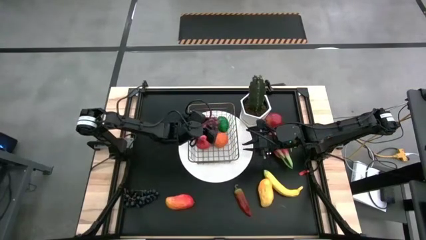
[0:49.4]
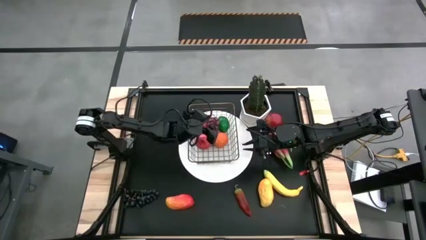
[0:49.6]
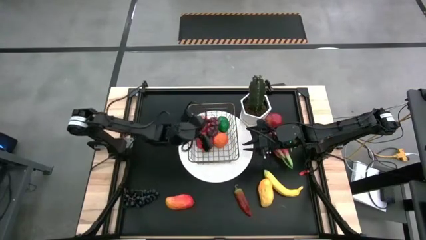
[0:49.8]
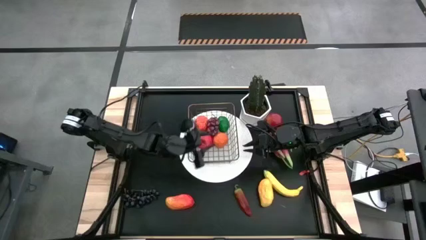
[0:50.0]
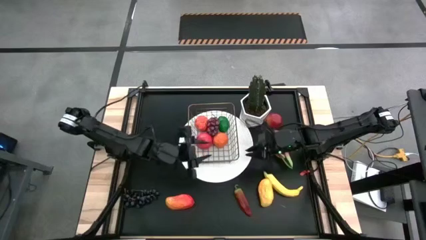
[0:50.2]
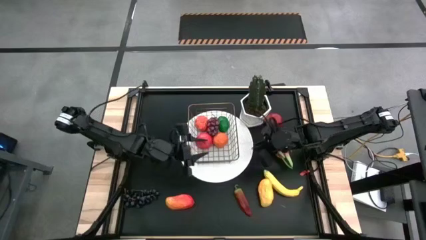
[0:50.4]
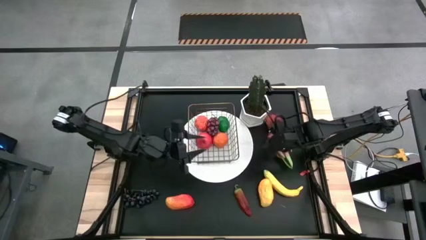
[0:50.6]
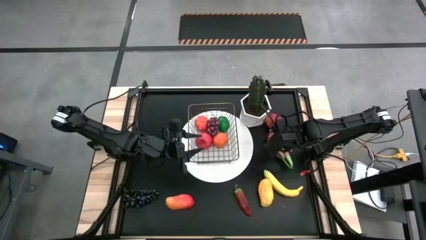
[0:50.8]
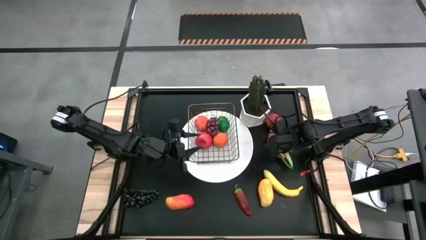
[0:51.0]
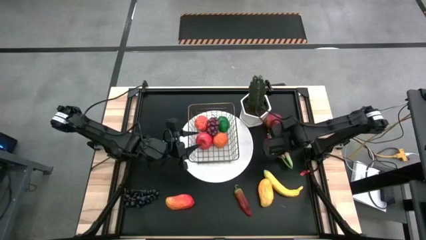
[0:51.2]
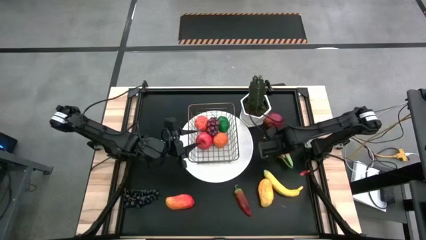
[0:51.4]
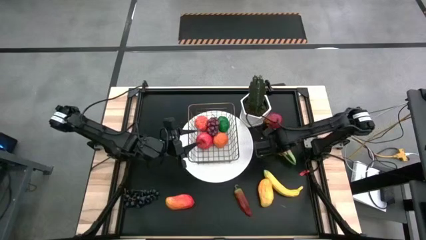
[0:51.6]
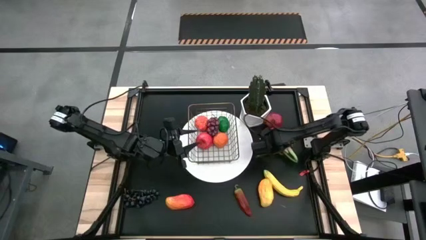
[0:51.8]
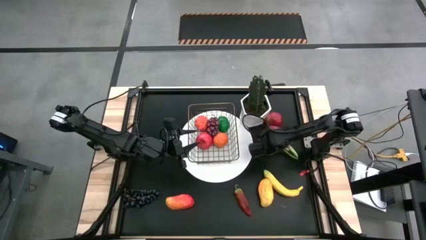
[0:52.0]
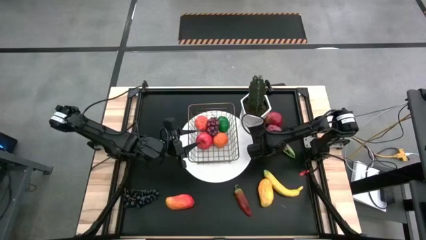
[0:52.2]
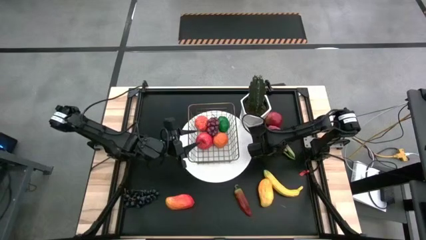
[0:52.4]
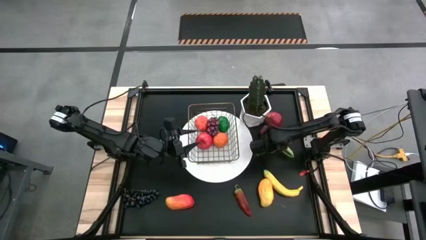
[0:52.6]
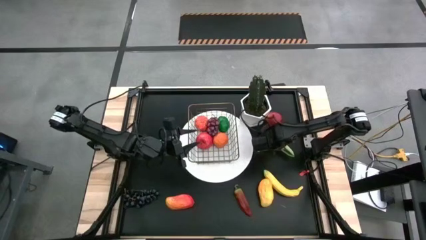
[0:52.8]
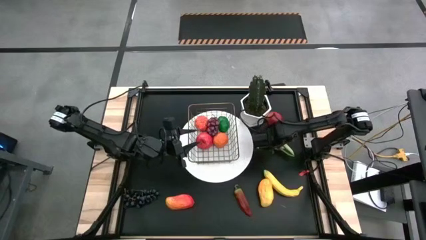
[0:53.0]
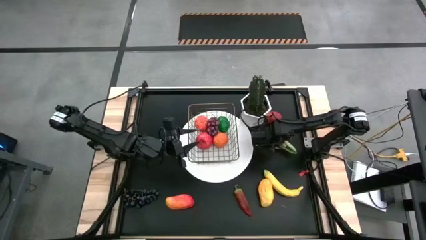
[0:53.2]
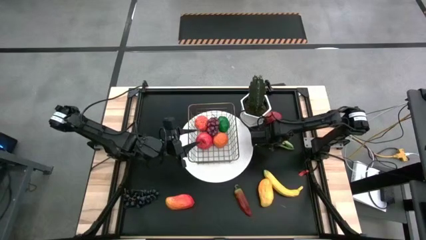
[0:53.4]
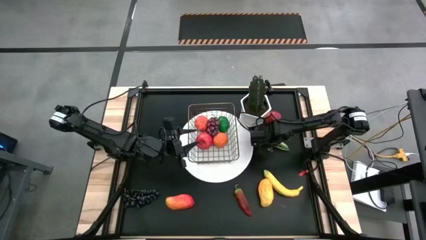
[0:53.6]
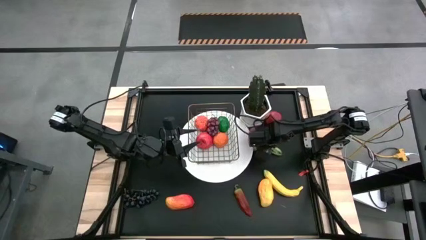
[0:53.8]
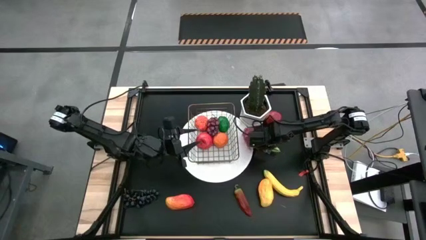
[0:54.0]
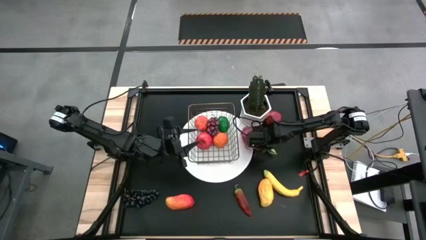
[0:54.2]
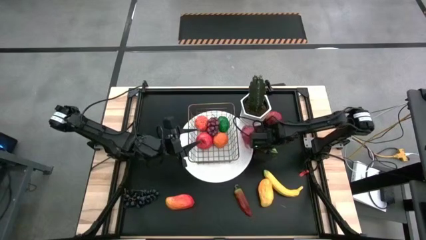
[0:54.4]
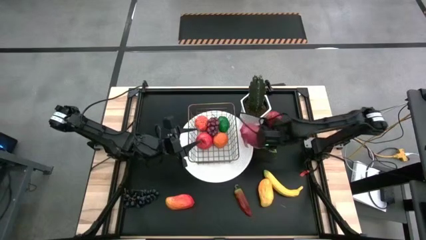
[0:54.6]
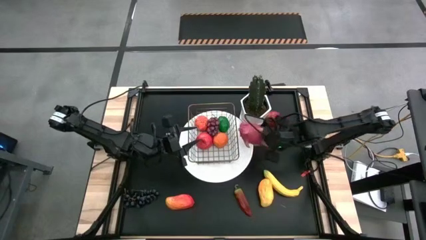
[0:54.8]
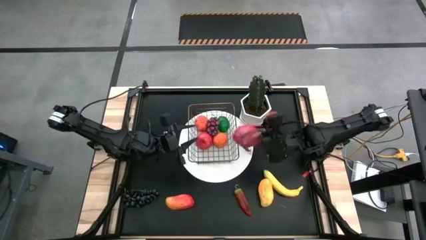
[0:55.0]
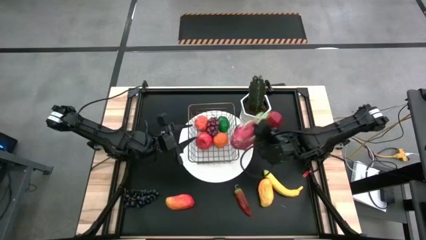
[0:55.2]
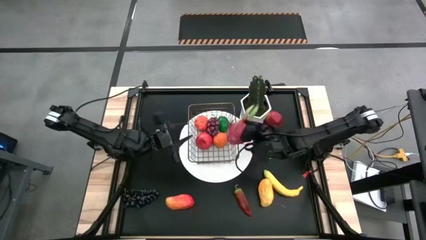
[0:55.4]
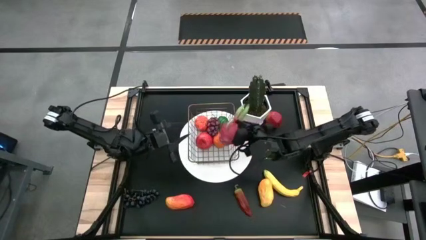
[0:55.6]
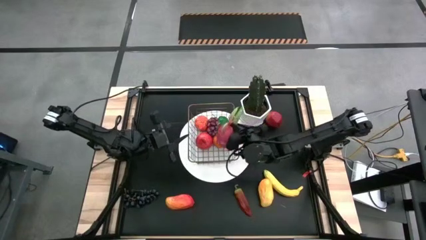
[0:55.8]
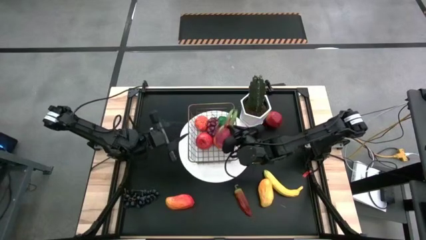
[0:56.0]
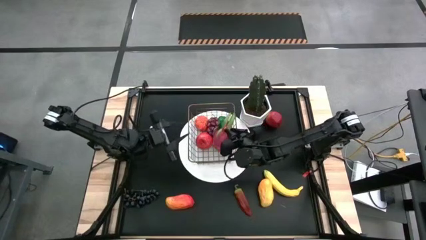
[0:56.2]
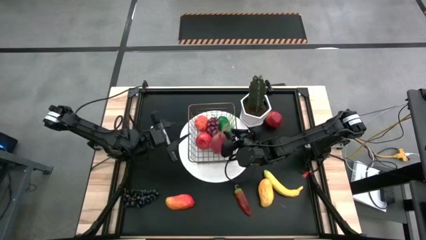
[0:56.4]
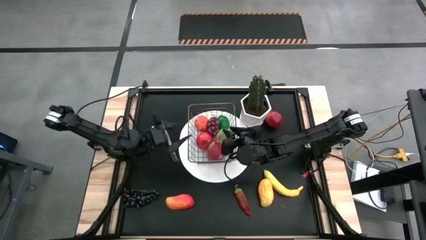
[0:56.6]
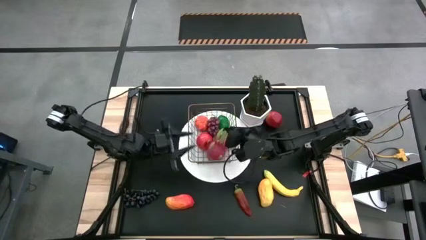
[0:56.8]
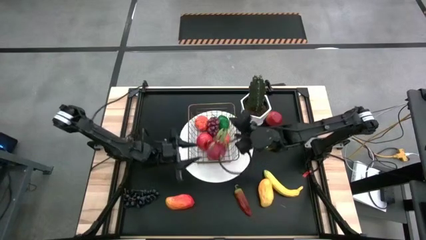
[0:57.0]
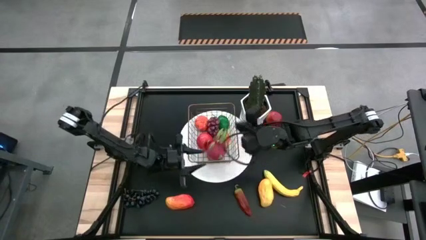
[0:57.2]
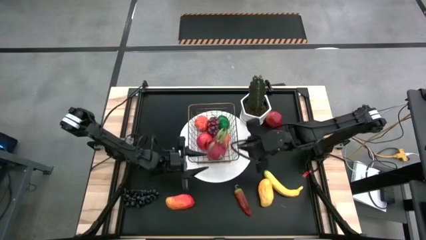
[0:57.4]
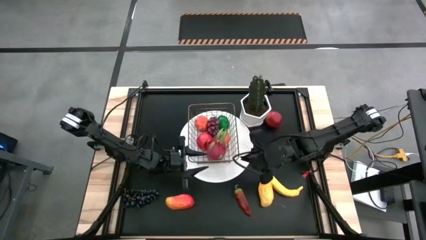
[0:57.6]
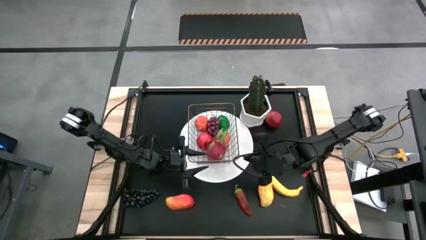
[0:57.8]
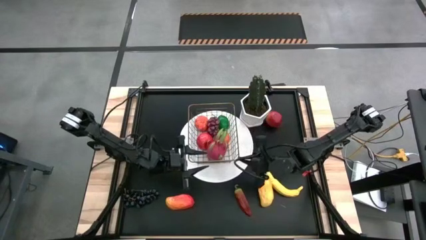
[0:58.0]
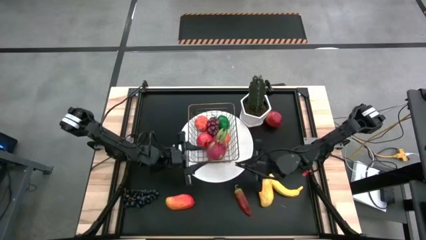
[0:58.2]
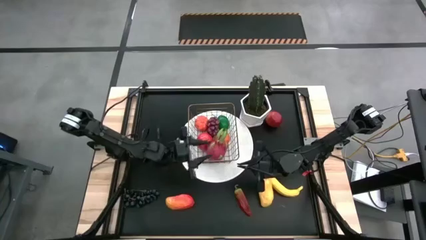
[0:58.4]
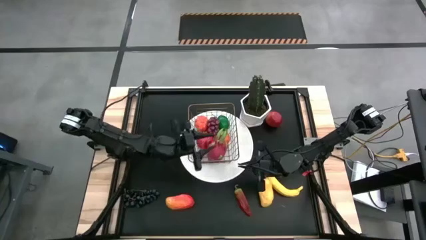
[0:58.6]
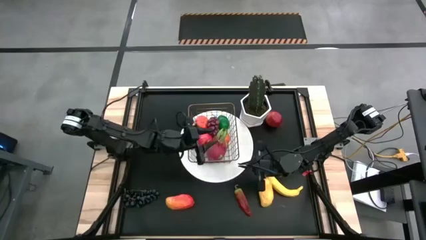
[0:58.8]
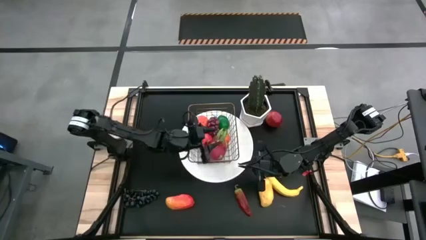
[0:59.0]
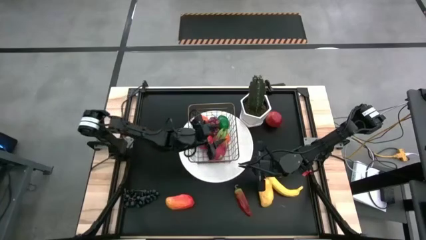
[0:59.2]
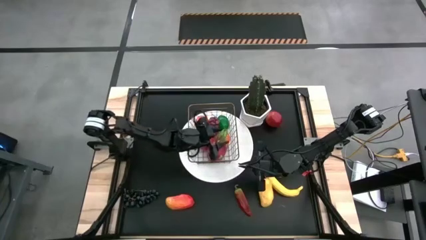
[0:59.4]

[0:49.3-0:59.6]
Task: Build produce basket
Put the dragon fruit into the gold wire basket

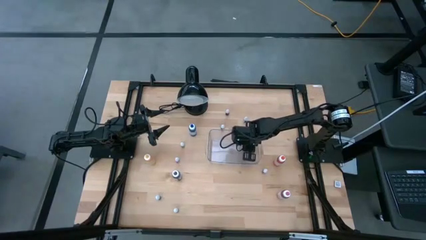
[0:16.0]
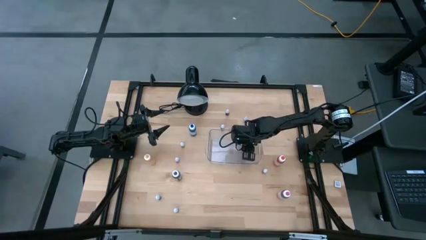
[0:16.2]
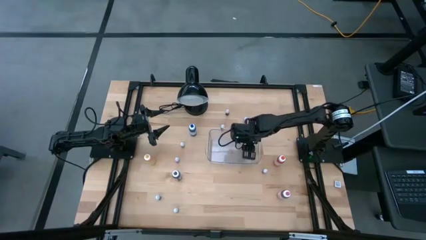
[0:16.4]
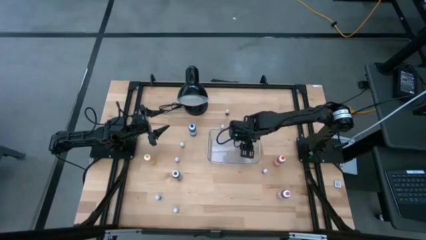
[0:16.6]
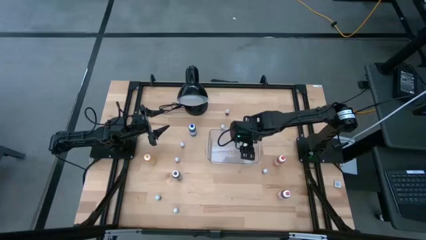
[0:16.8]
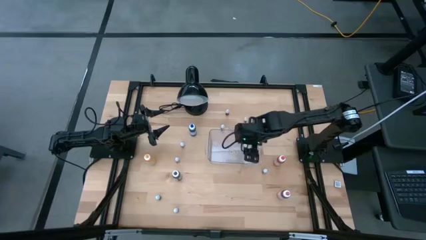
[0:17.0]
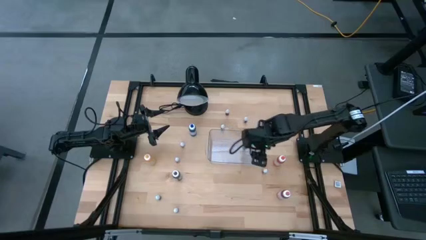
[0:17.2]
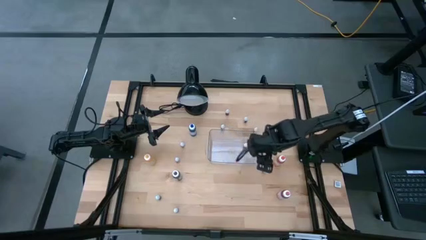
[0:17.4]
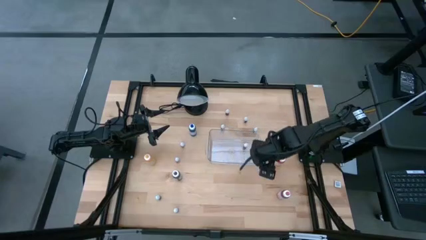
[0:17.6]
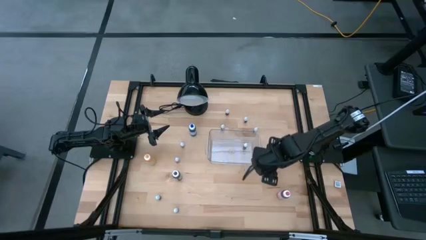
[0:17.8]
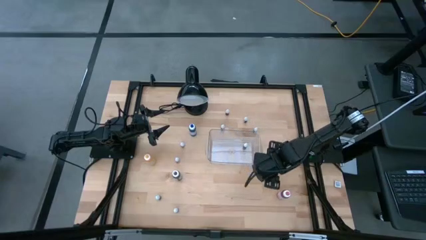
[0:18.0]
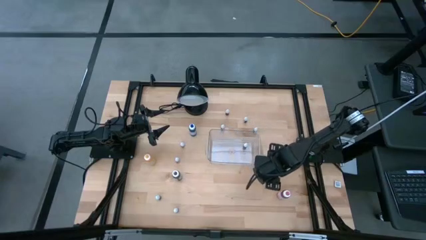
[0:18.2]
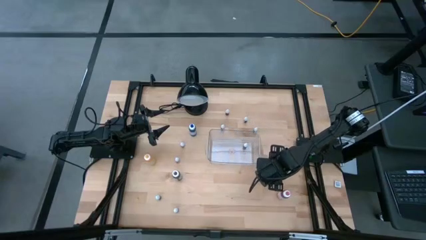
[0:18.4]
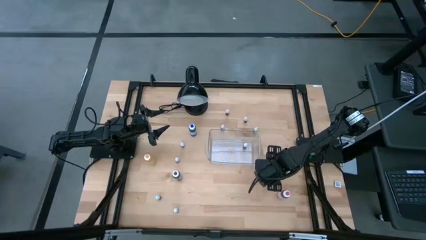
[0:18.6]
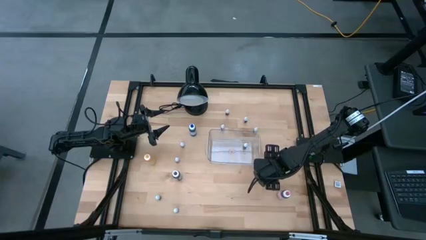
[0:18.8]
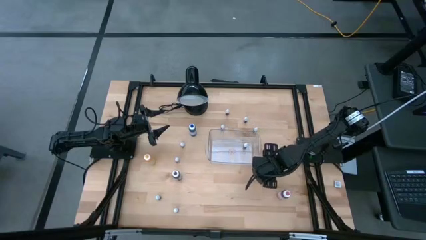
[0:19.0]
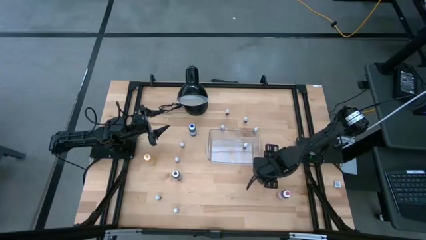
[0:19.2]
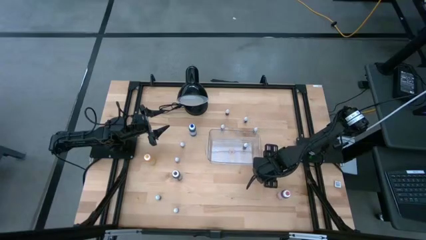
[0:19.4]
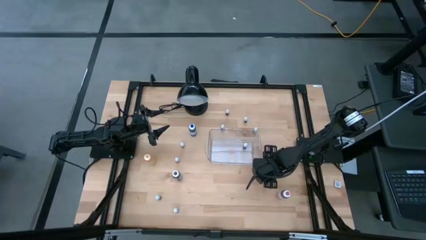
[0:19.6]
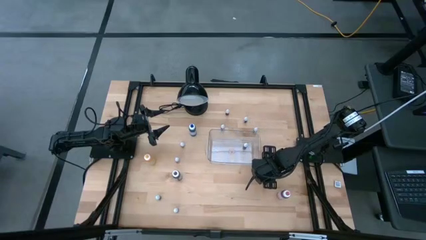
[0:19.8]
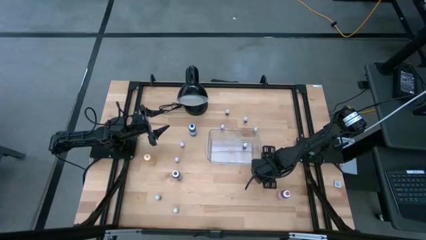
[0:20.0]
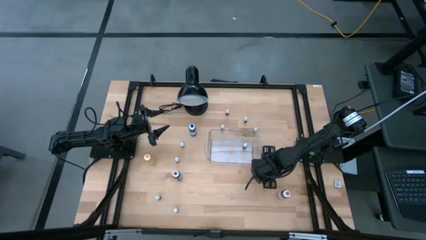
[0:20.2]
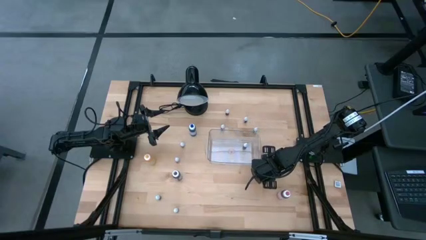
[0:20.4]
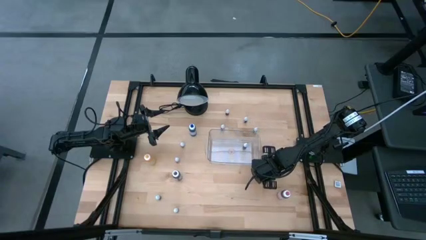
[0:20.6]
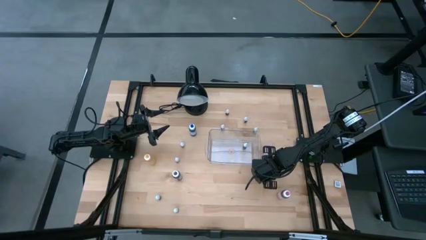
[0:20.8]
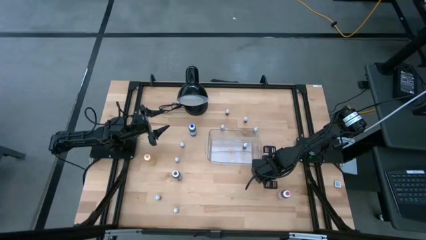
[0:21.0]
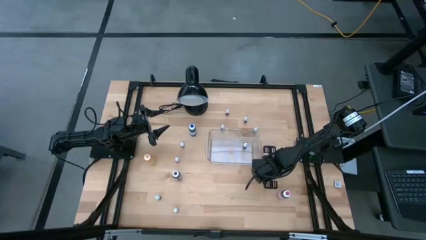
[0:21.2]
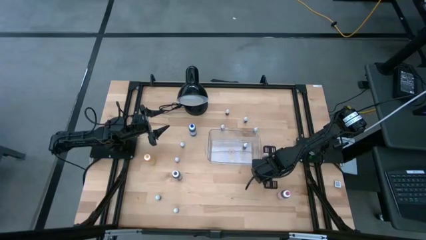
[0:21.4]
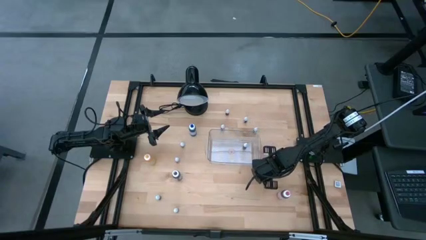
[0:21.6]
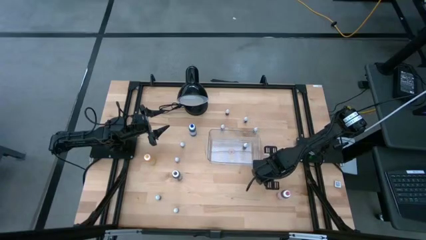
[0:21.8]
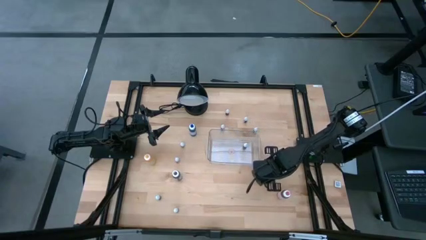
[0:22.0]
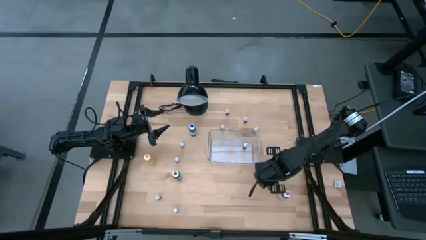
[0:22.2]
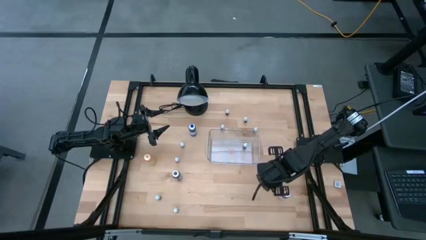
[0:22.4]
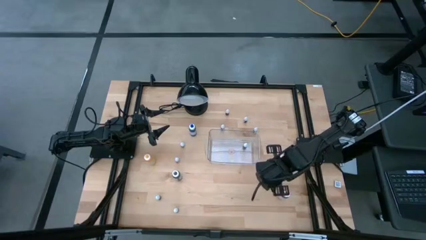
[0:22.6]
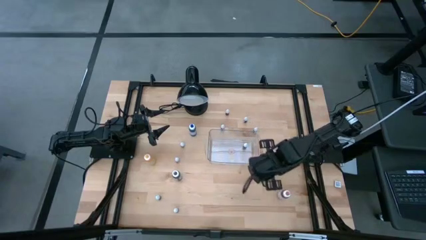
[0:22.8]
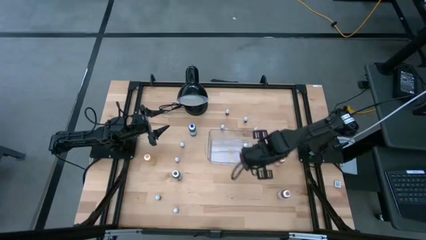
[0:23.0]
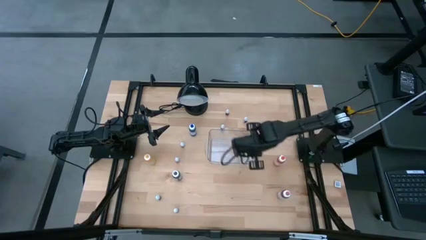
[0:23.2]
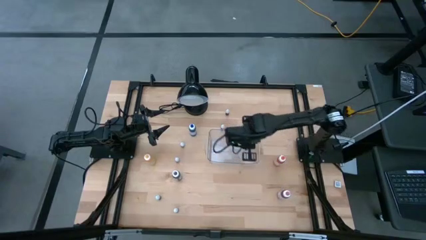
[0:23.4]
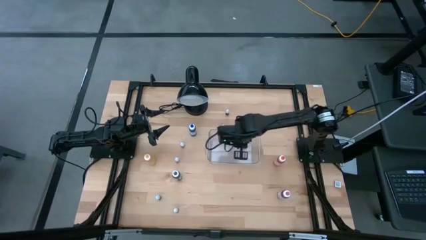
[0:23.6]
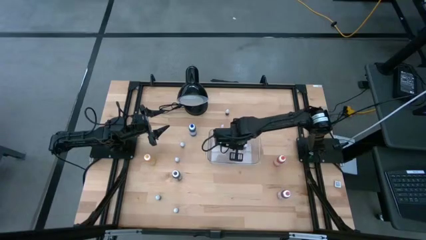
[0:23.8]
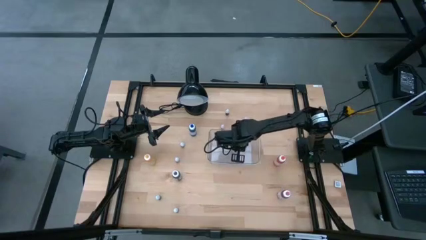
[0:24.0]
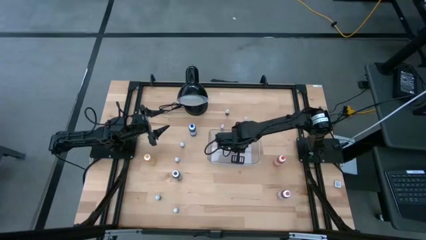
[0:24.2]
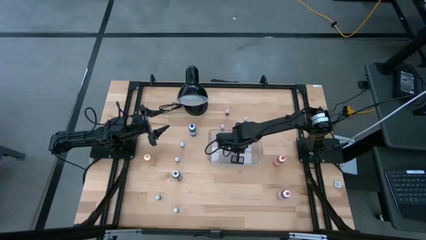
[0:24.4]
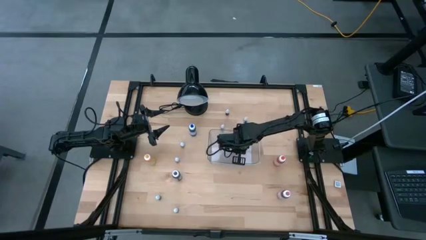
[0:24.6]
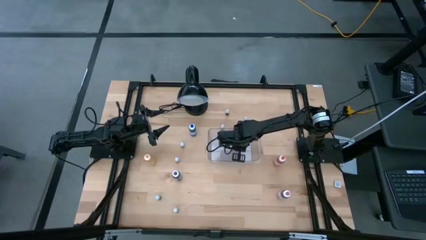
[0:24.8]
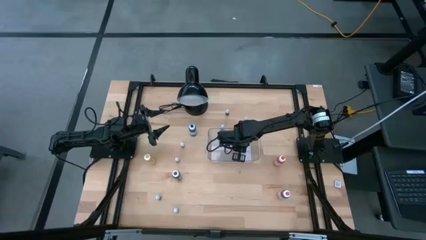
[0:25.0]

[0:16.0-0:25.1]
Task: Pick & Place food coloring
Put the small red food coloring bottle into the transparent bin
